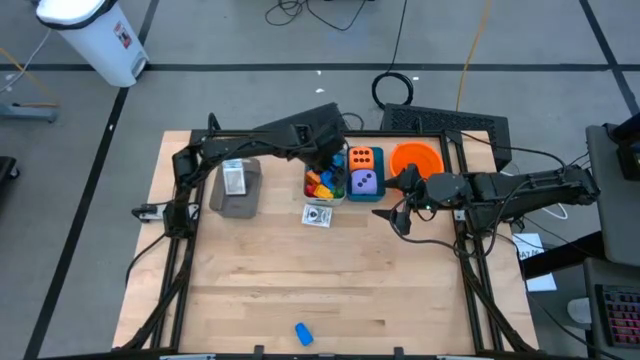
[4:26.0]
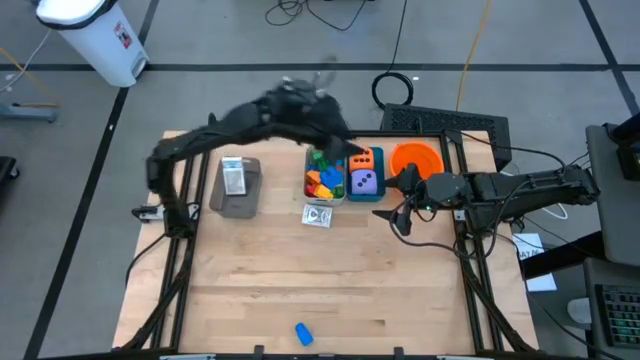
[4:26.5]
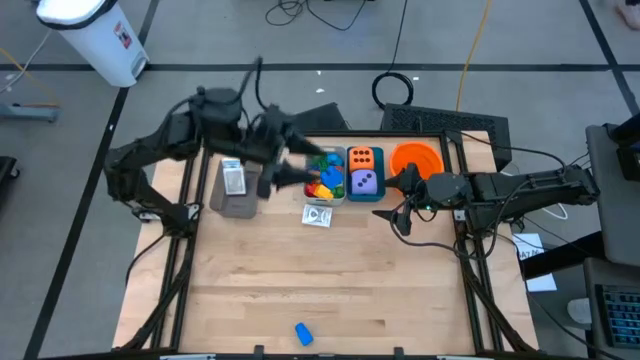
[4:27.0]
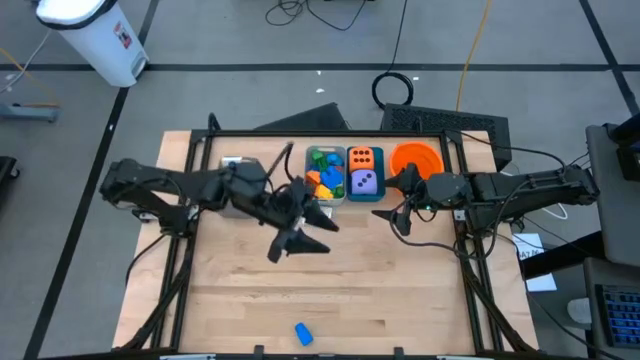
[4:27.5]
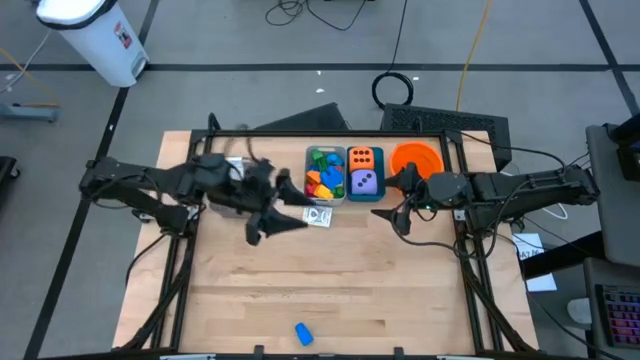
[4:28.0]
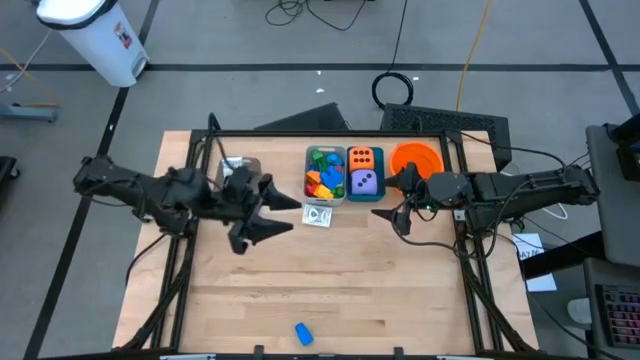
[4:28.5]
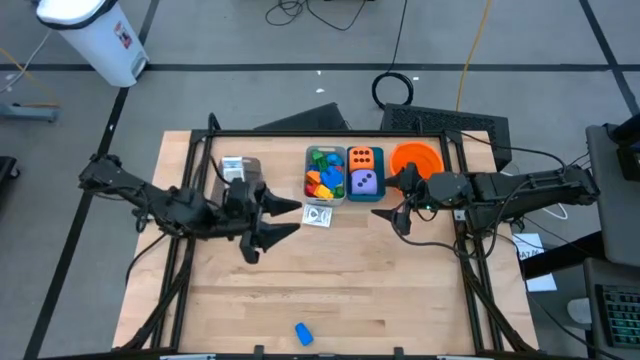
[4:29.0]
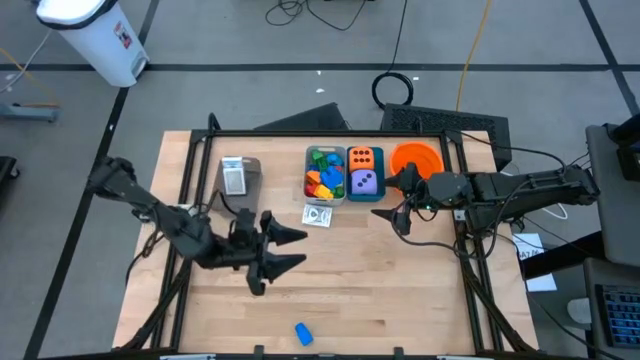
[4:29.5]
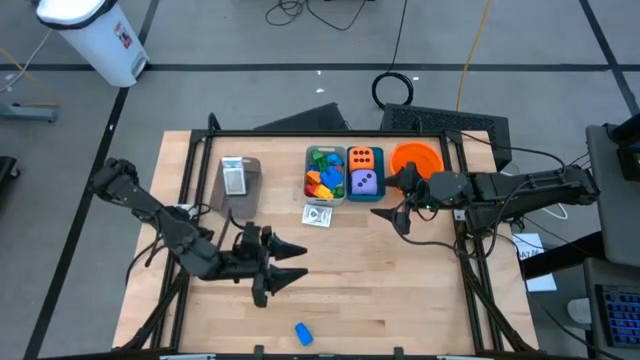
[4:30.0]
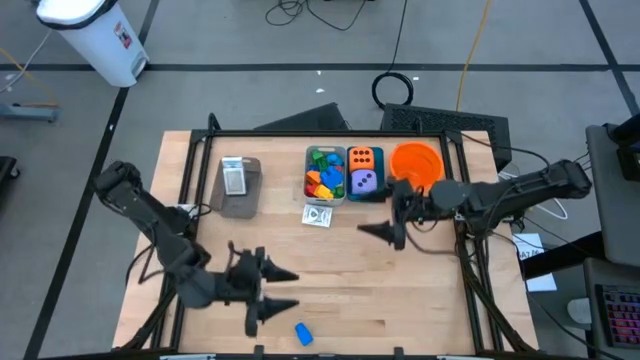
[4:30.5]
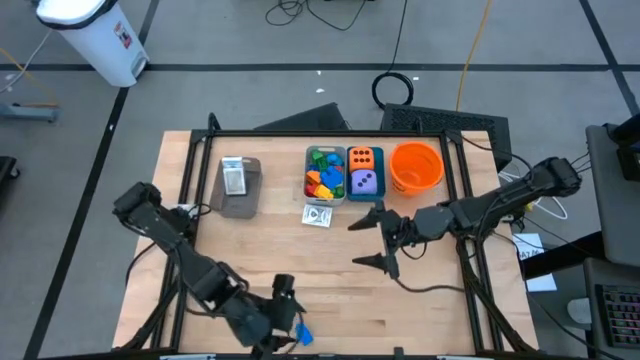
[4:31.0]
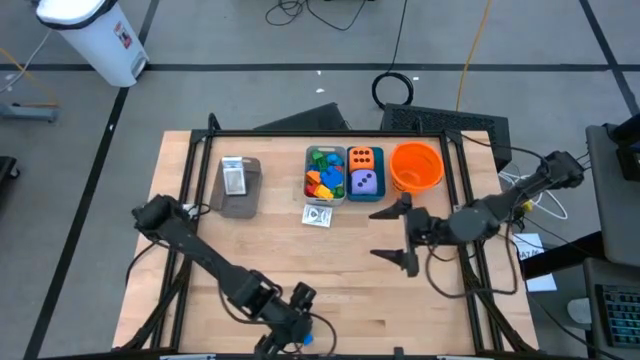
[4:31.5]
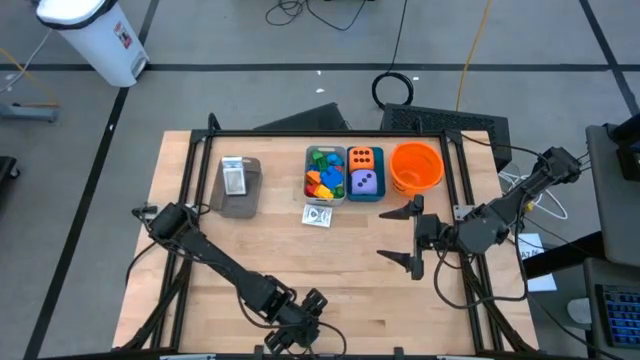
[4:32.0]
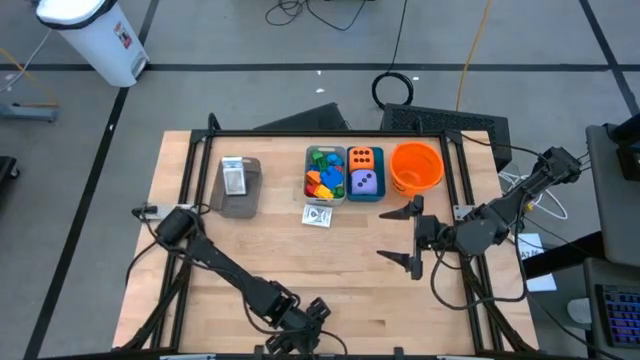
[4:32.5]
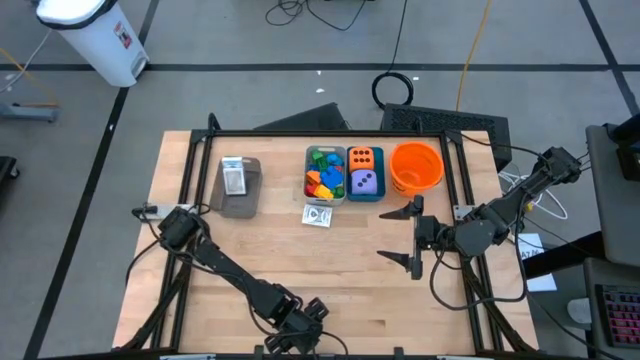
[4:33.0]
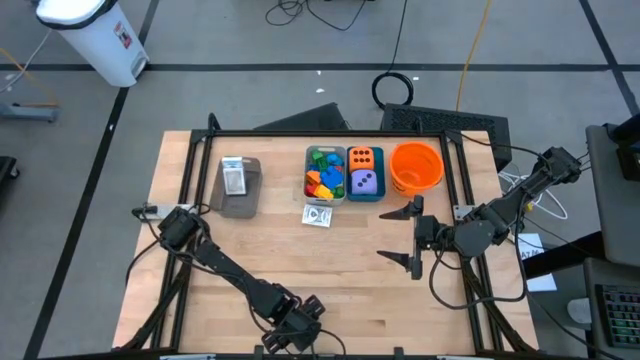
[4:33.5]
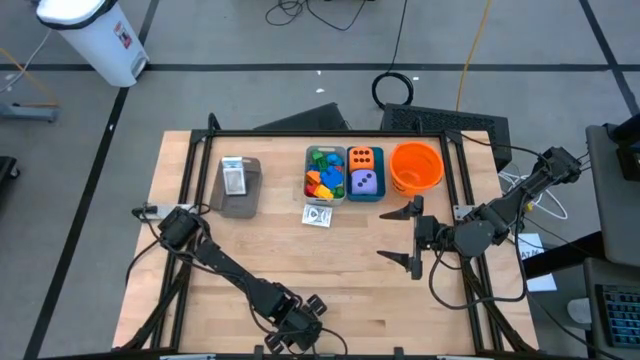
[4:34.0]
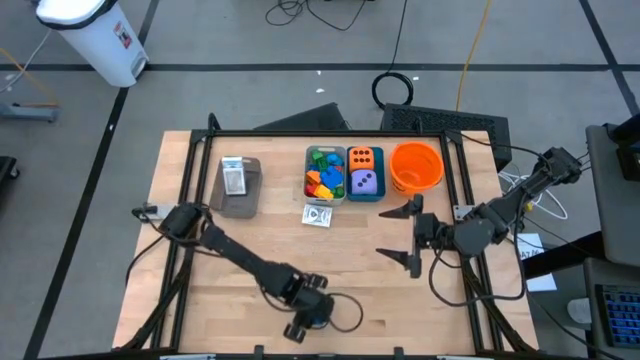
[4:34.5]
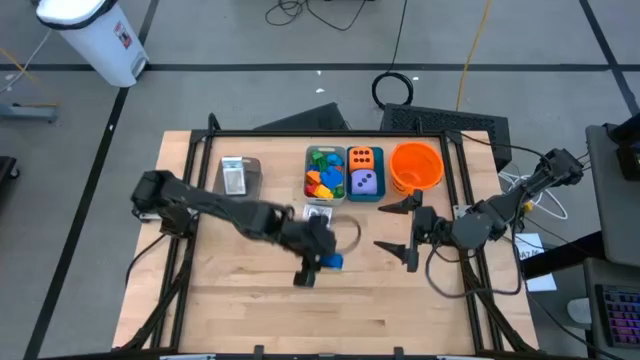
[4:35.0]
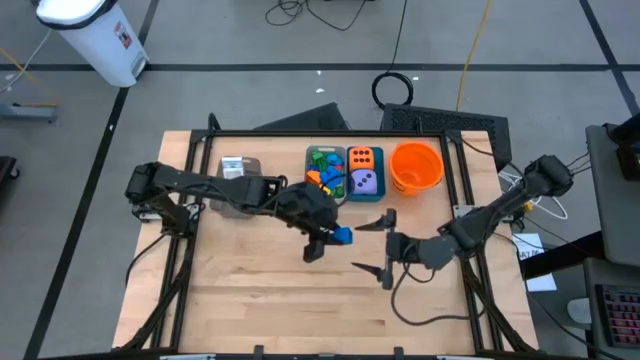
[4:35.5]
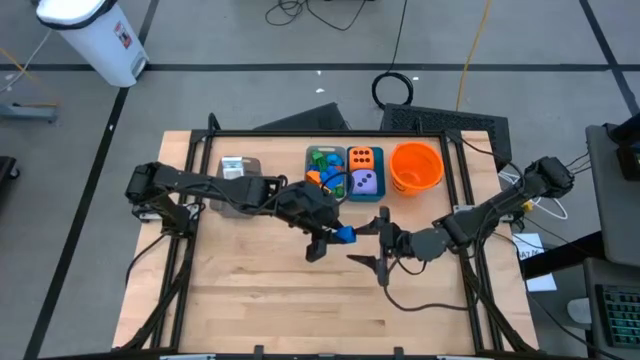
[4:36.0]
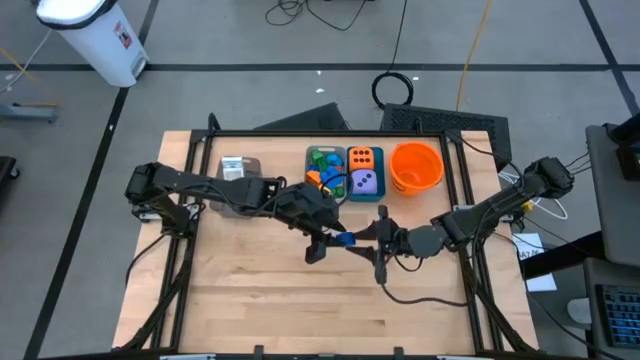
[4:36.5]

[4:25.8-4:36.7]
Task: Pick & Place Toys
Put the blue game piece into the gray bin

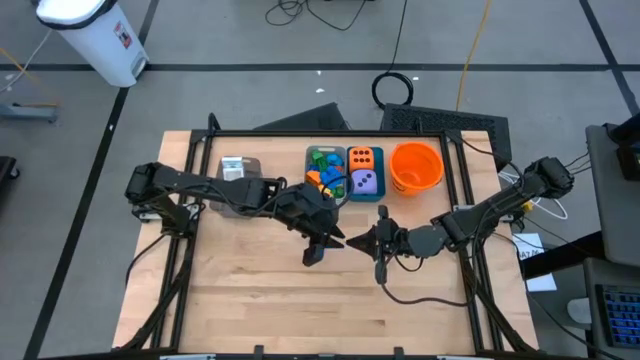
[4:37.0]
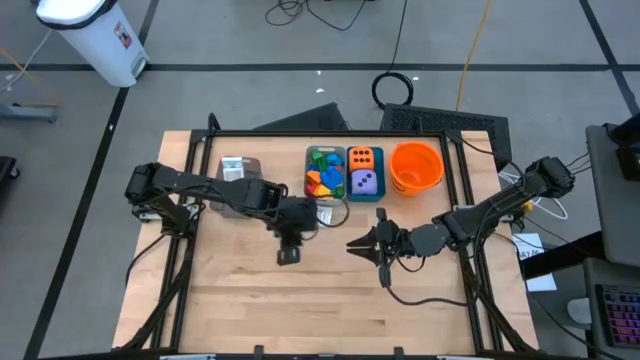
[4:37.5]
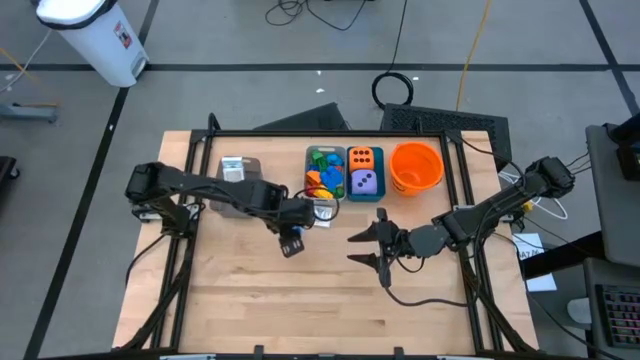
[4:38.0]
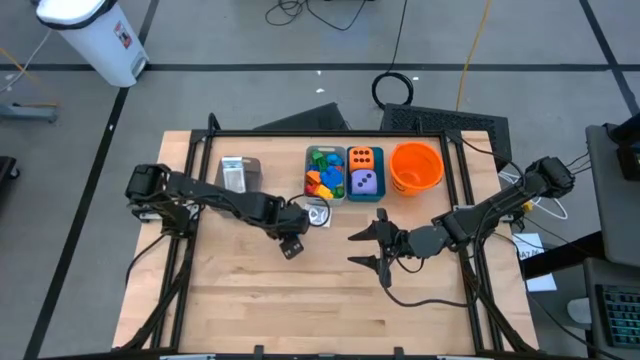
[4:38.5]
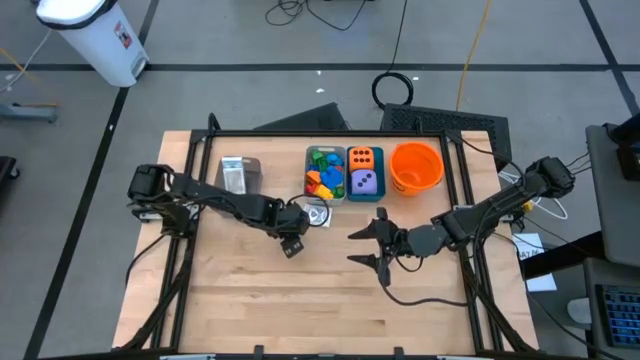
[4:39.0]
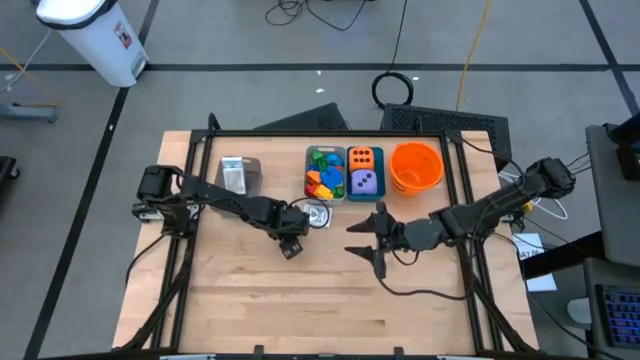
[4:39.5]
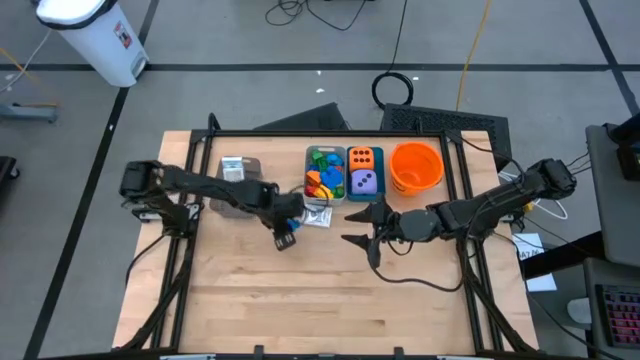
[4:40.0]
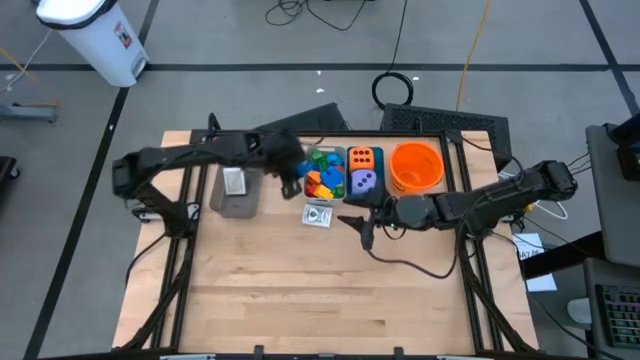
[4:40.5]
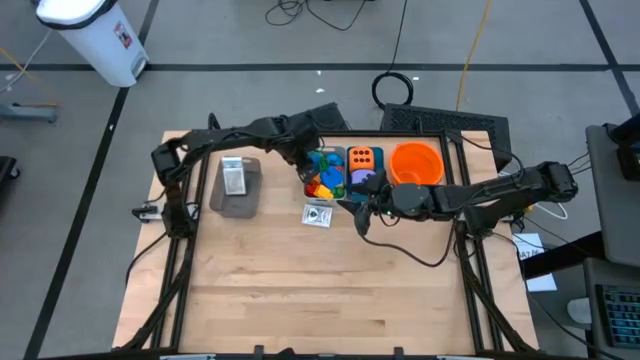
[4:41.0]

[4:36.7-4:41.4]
Put the blue game piece into the gray bin

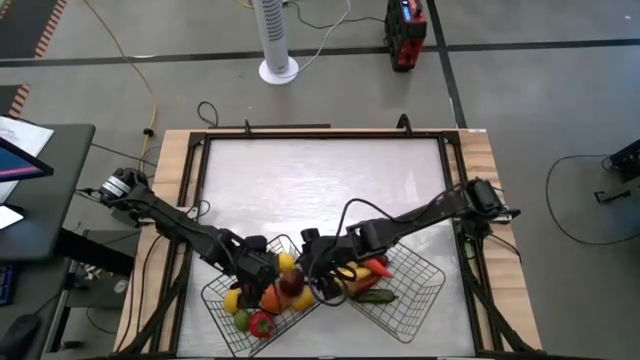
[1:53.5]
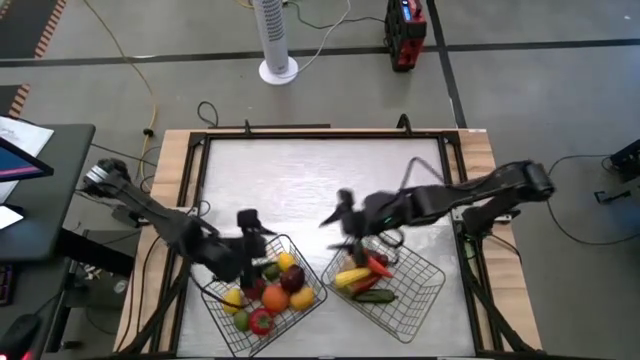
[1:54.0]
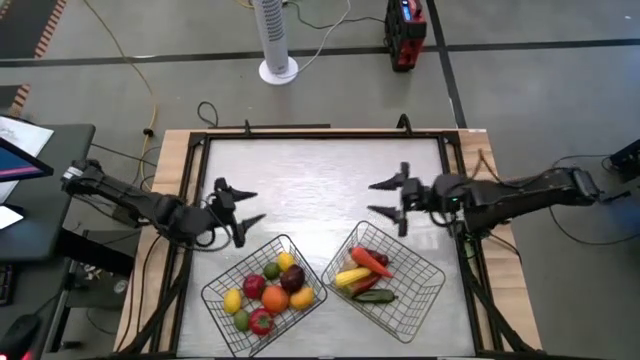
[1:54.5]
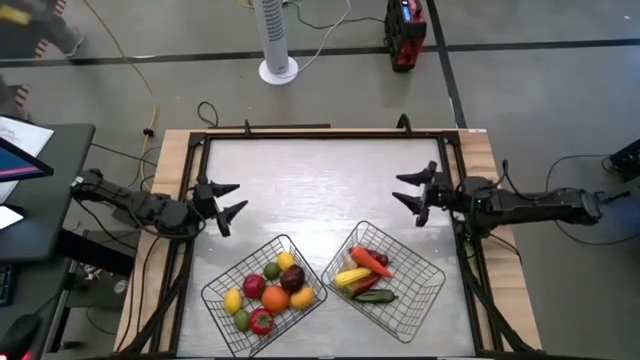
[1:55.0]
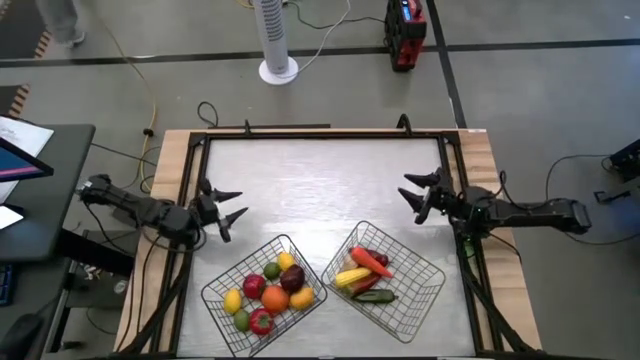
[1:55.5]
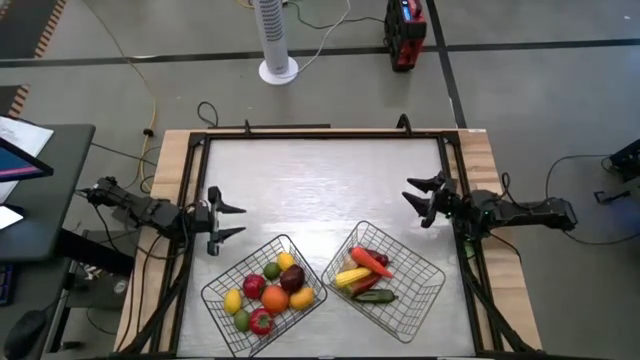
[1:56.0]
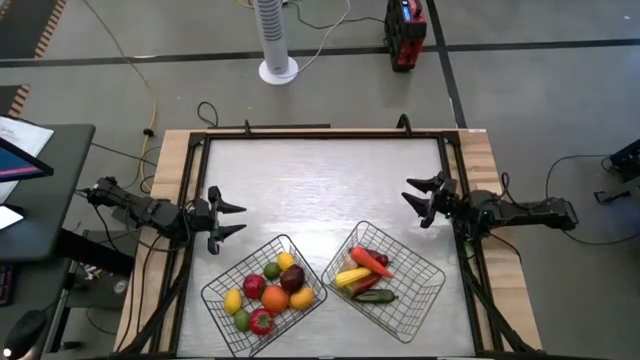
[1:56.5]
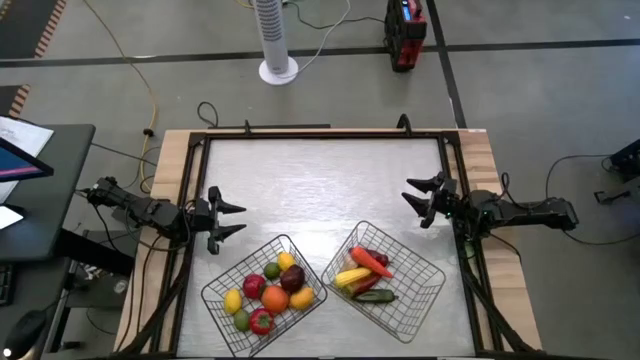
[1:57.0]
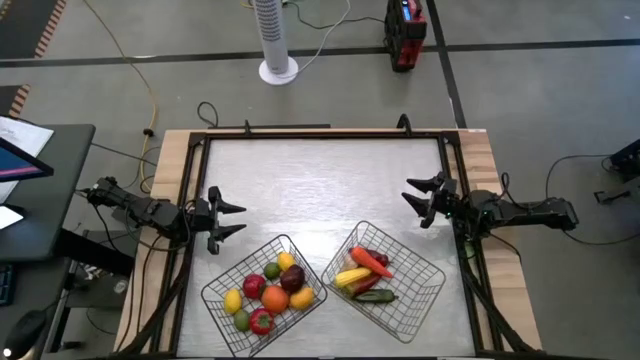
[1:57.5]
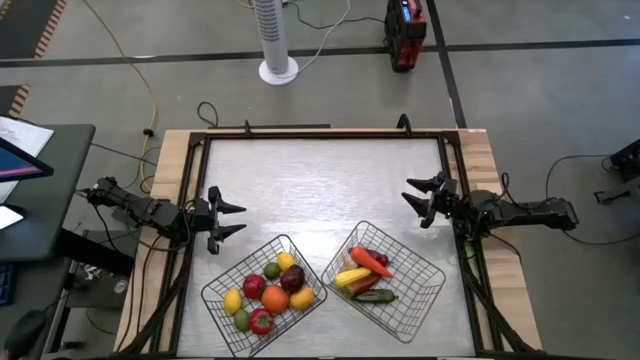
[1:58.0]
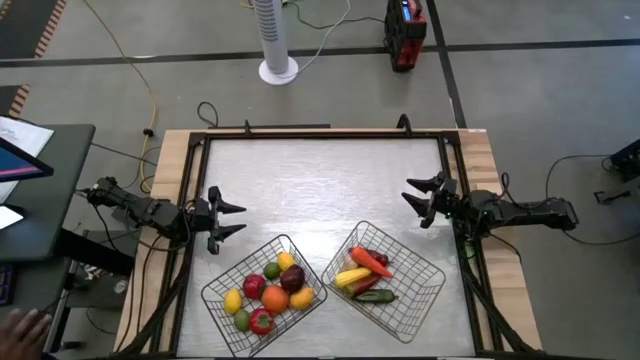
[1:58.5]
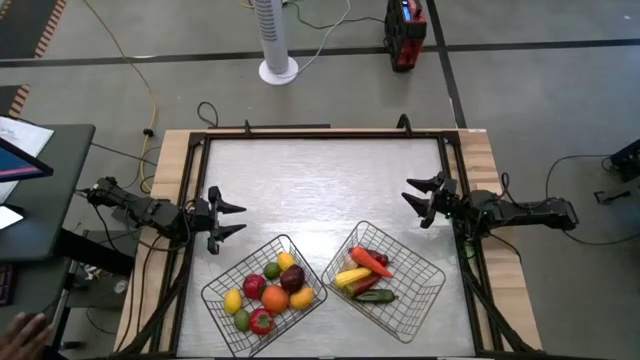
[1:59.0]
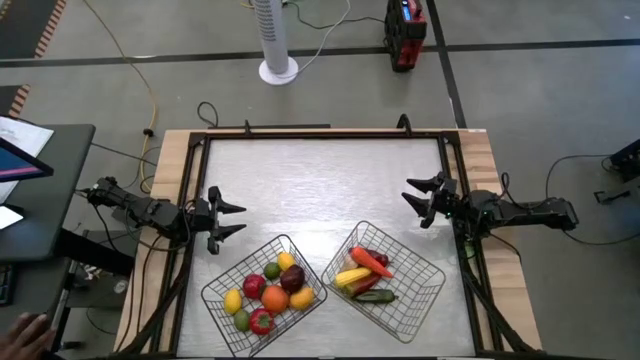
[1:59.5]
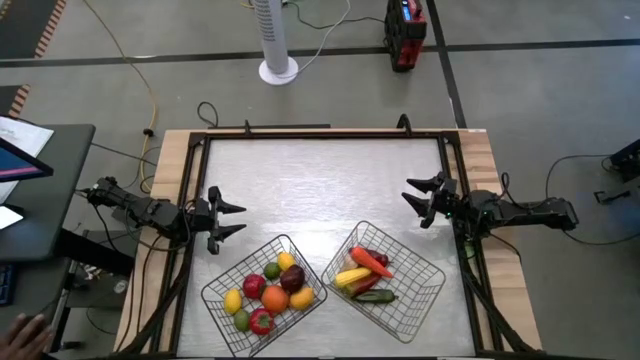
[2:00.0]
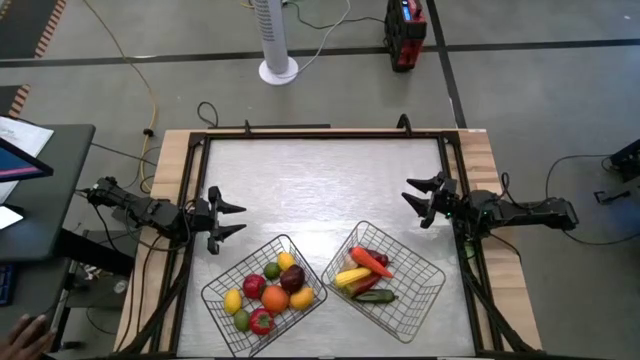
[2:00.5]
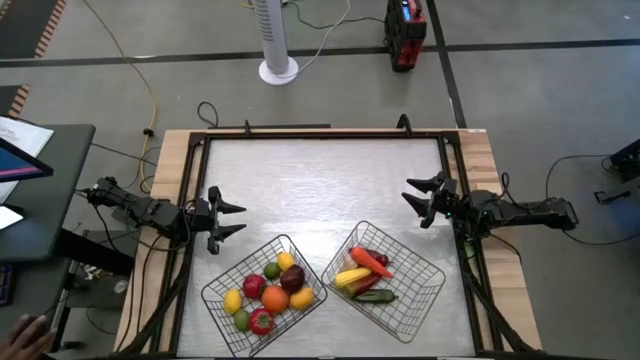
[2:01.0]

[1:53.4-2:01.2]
Task: Sort produce into baskets
Return to Home Position
